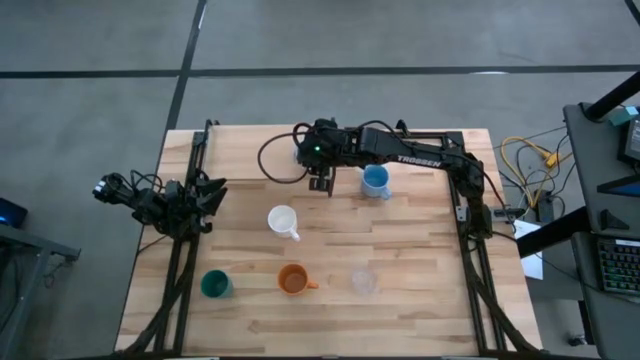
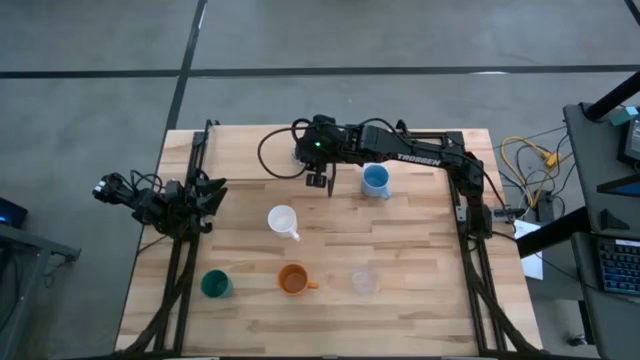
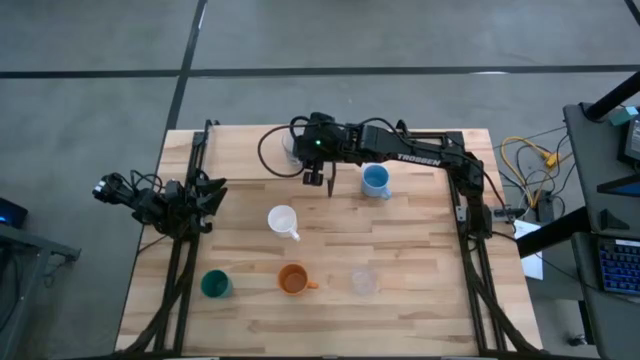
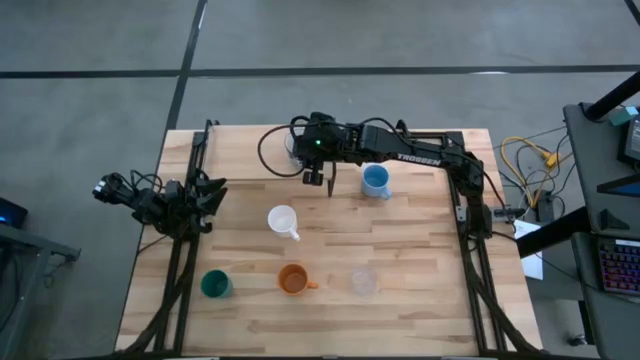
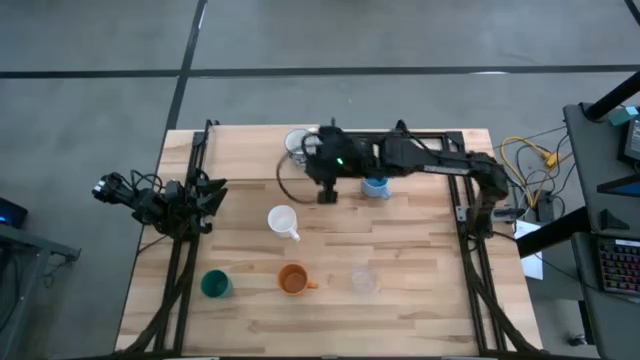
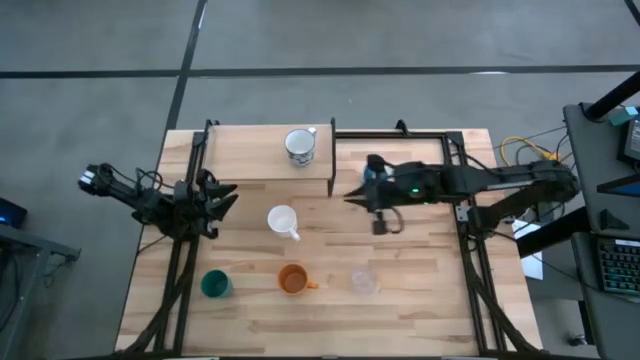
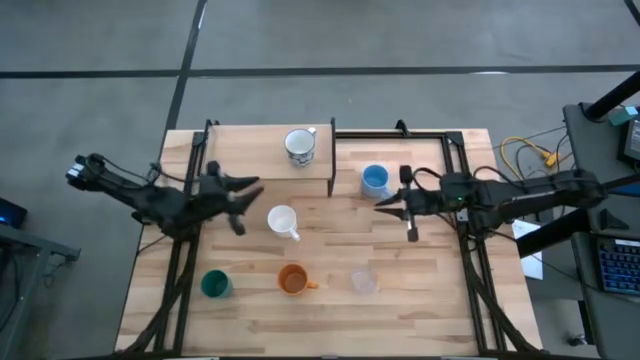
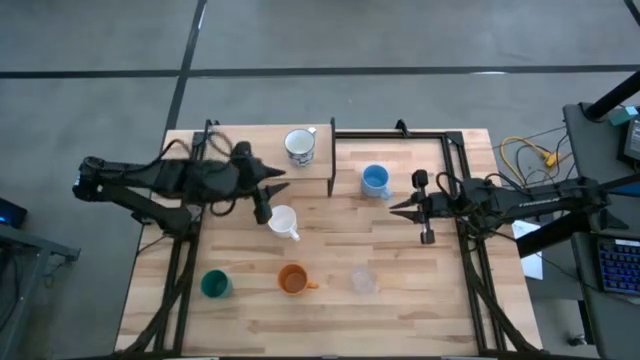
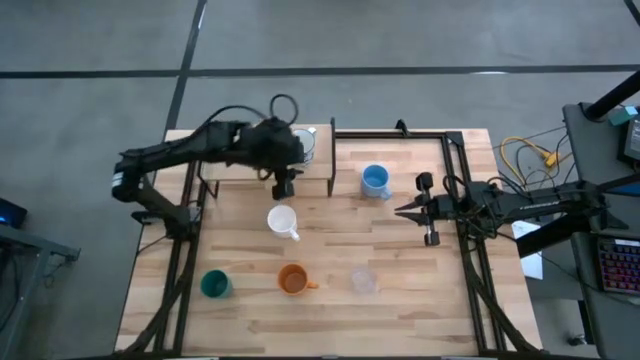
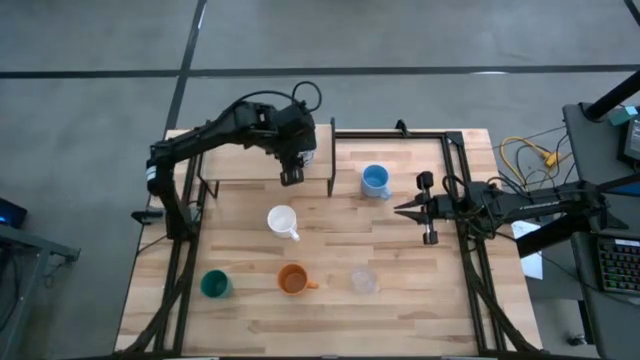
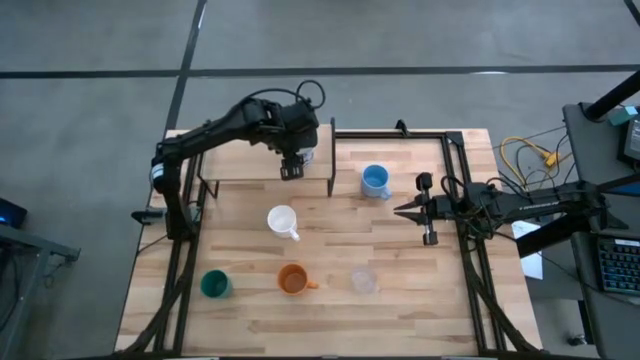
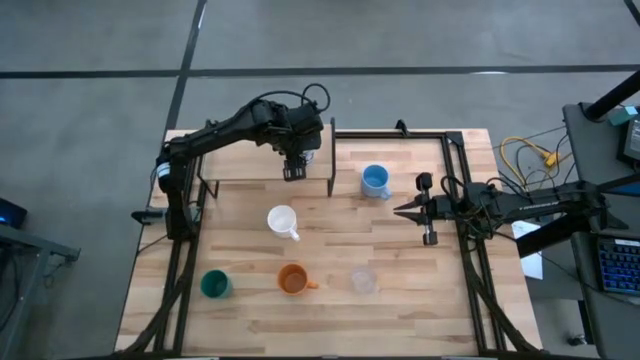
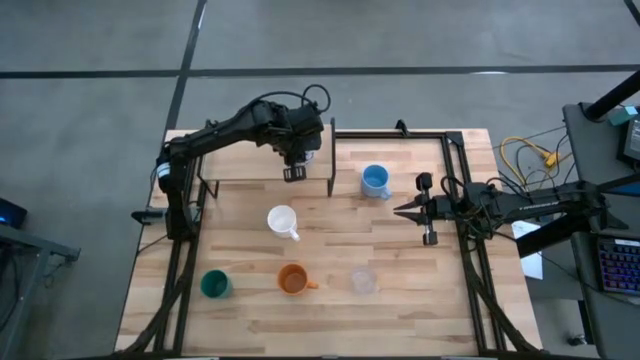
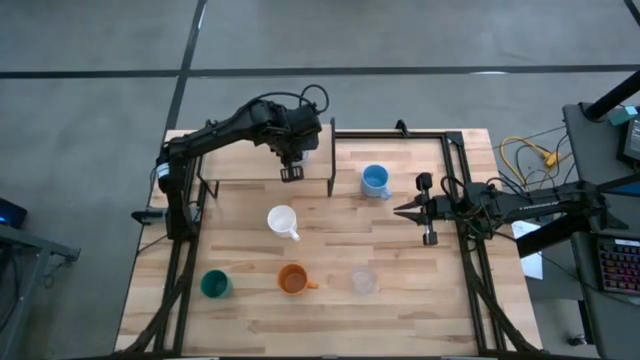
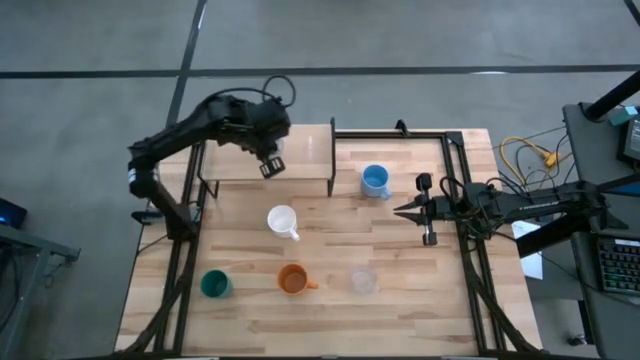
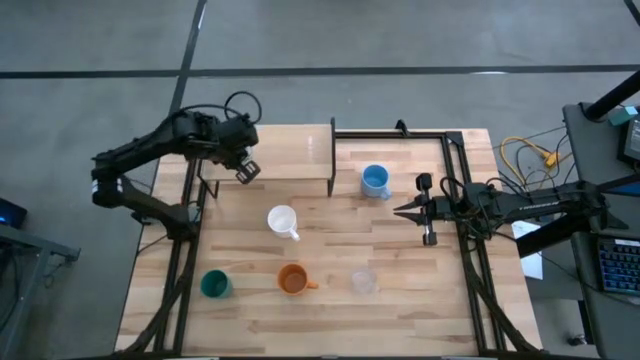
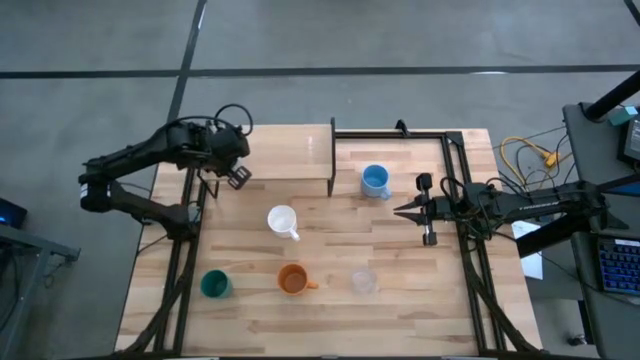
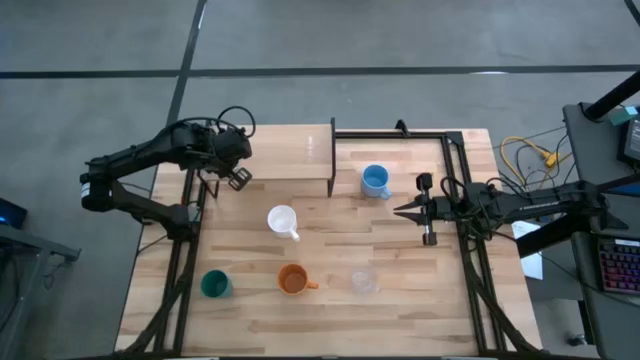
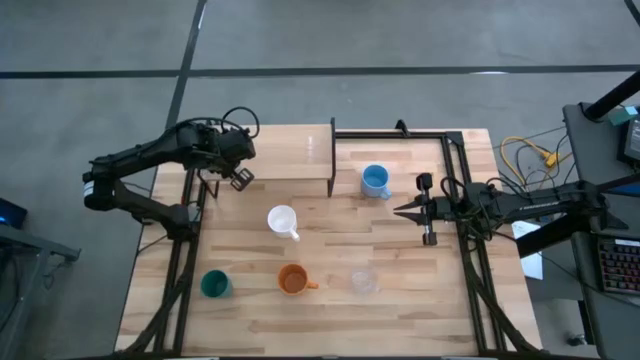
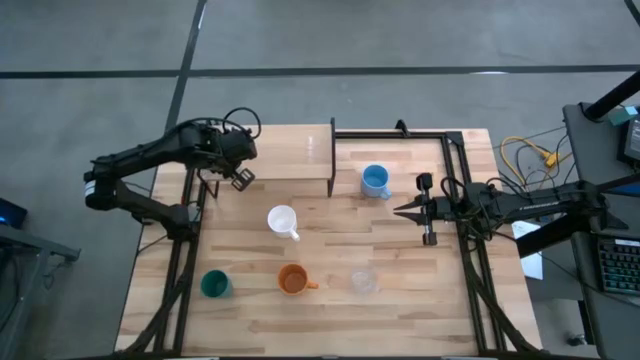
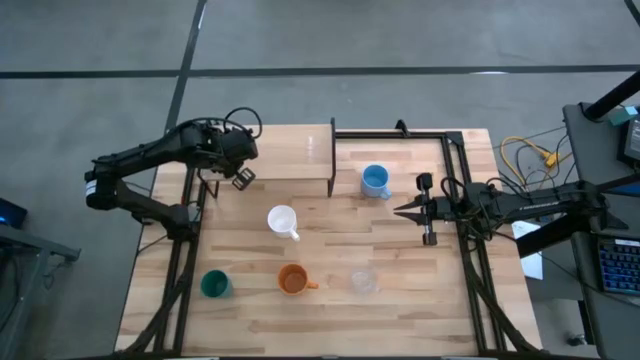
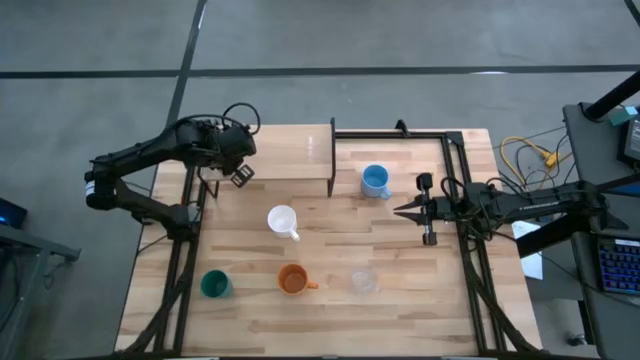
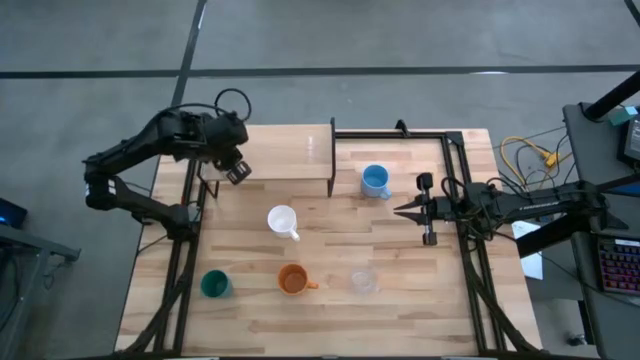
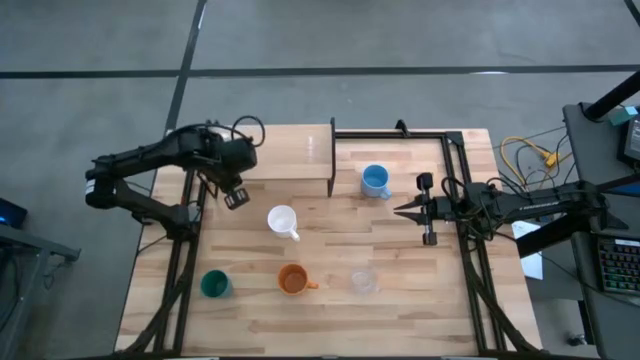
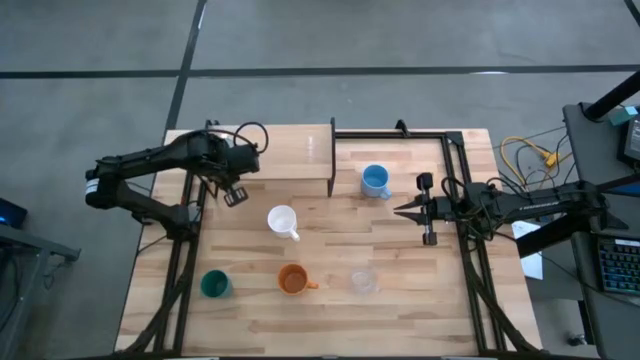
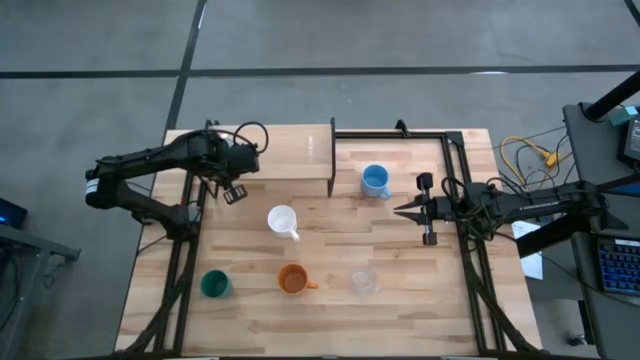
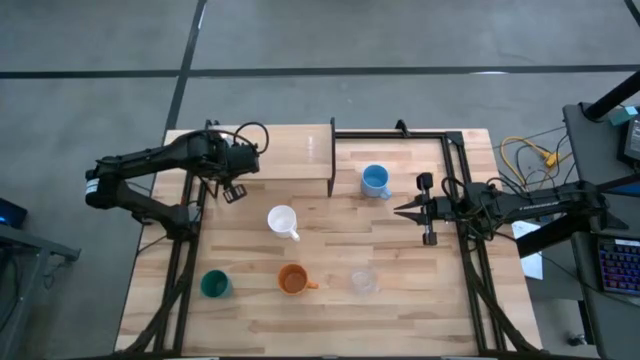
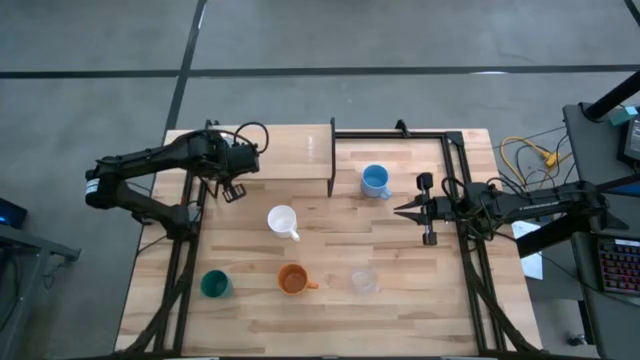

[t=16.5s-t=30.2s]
Task: Stack small to large cups/mugs on shelf
Put the blue patterned mug on the shelf

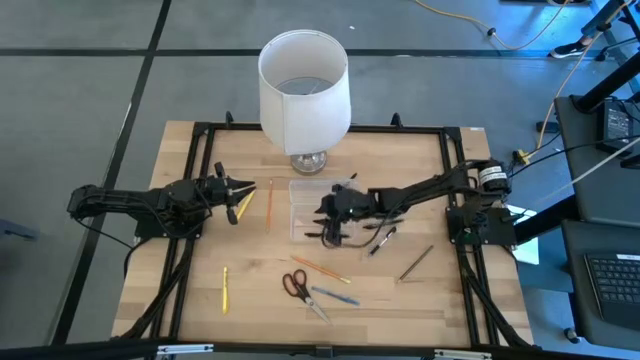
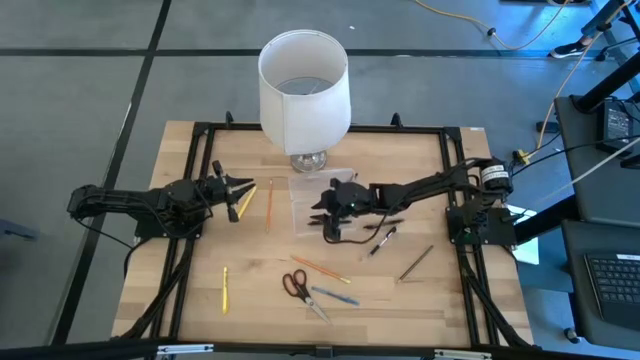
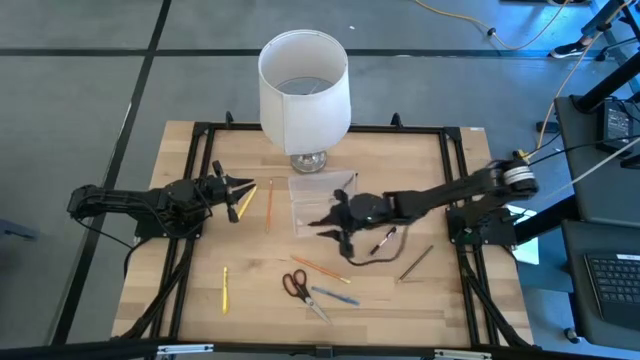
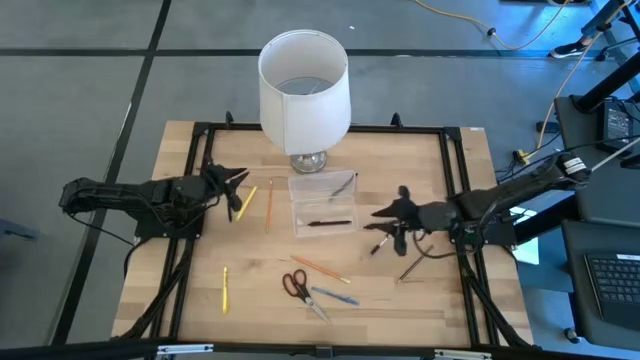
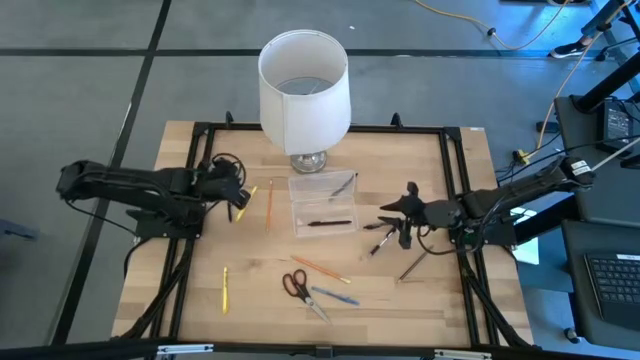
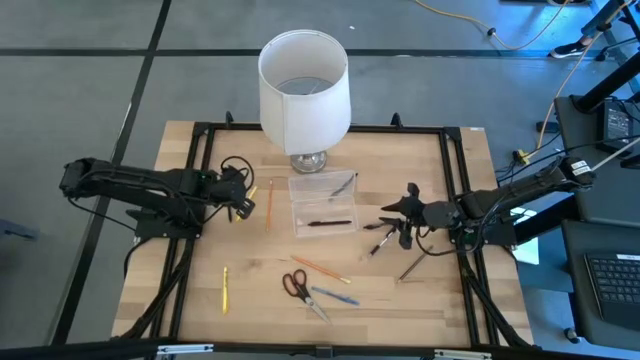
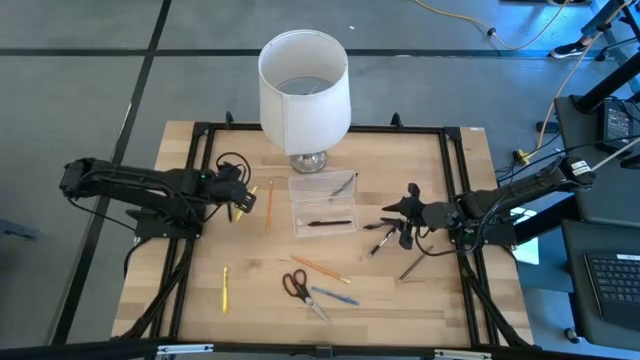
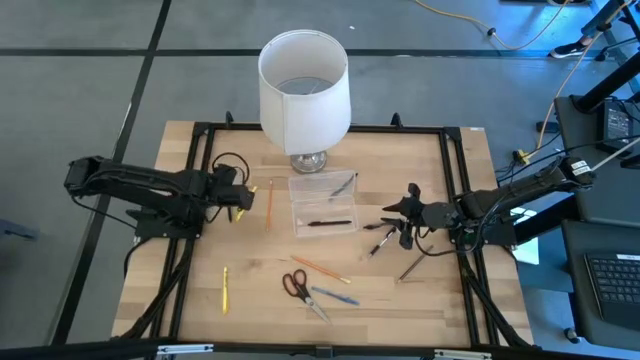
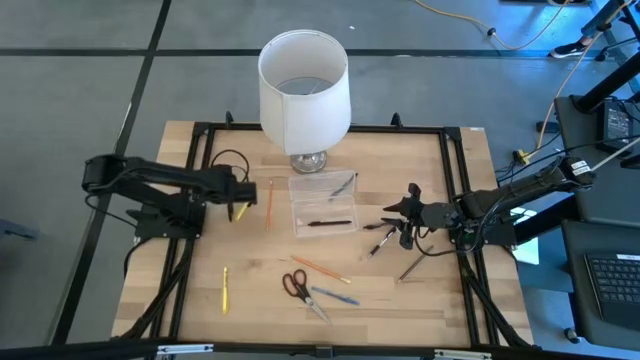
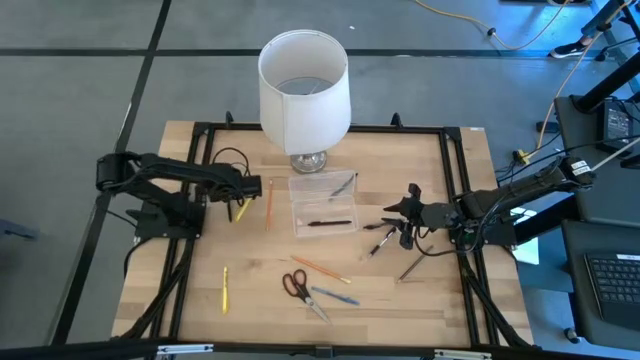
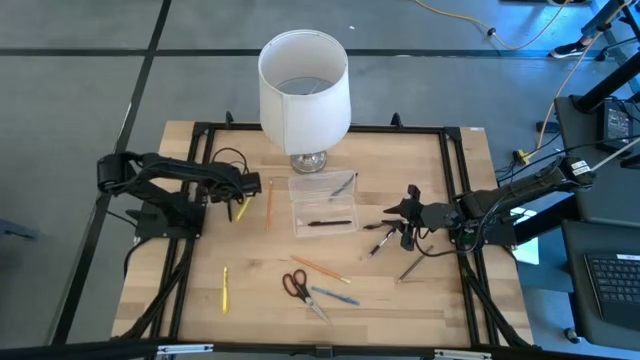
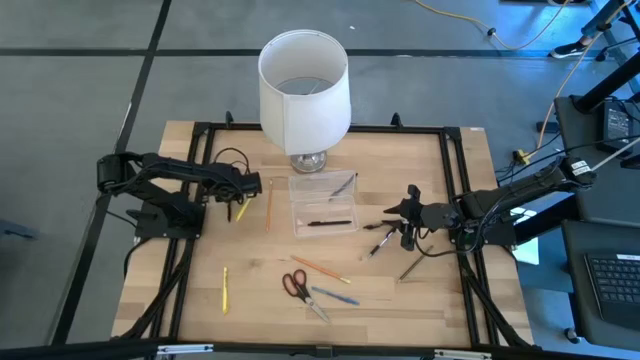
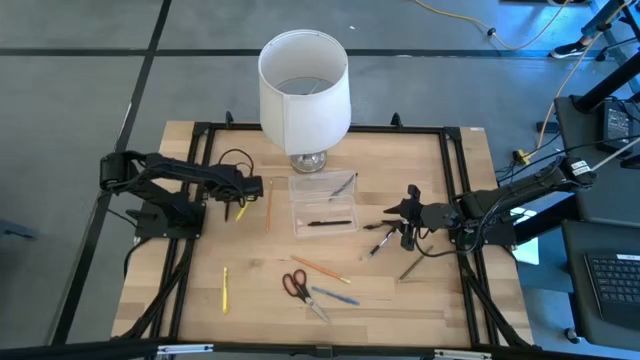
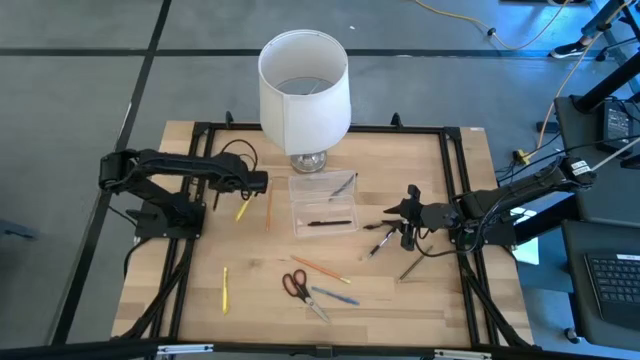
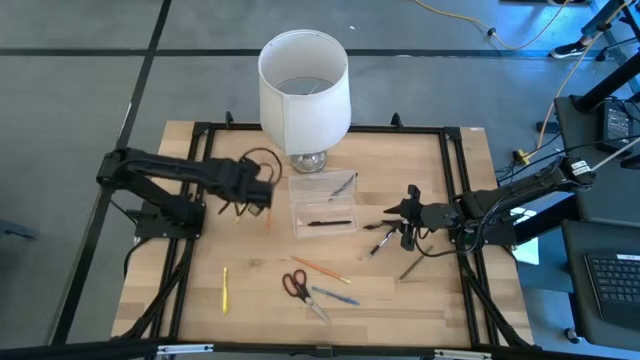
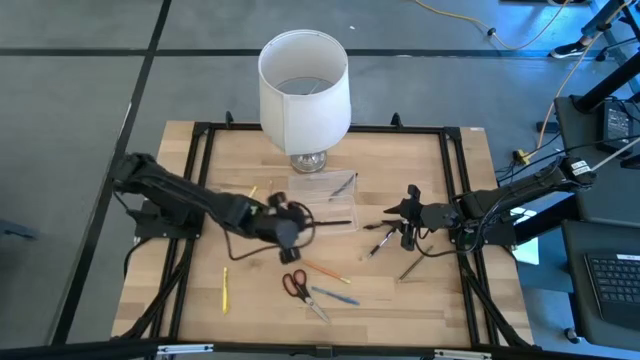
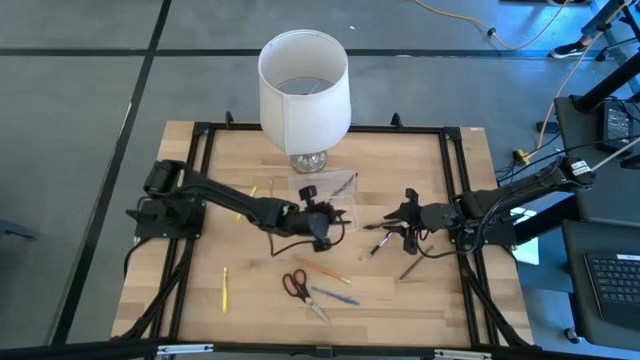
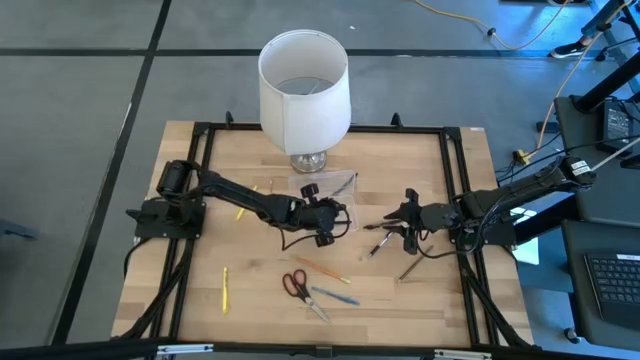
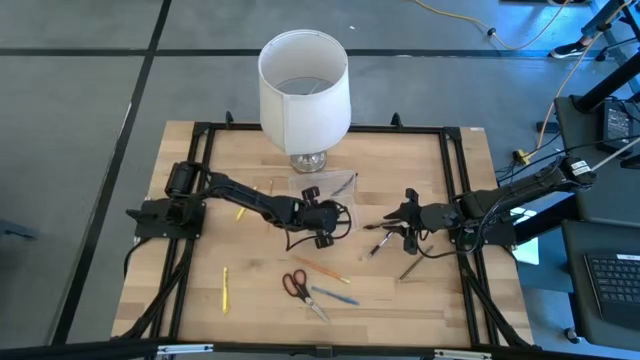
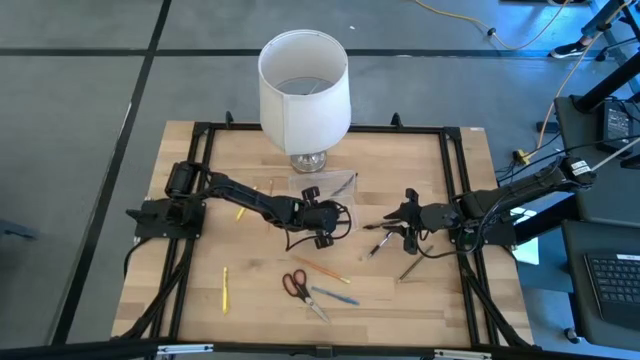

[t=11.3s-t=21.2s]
Task: Pick & place school supplies into a supply box
Put the black pen into the transparent supply box
